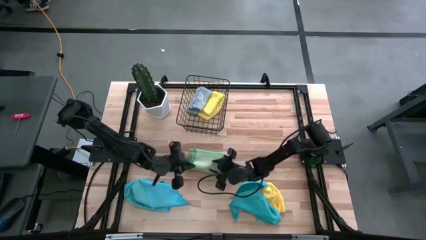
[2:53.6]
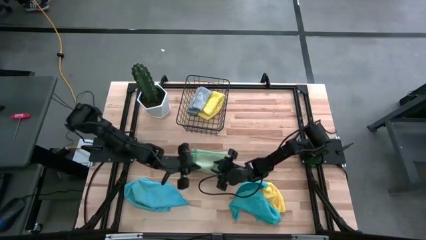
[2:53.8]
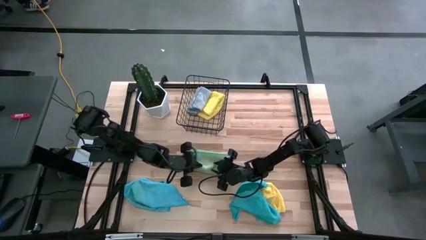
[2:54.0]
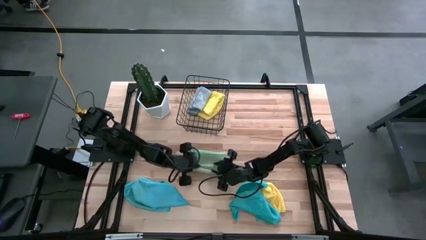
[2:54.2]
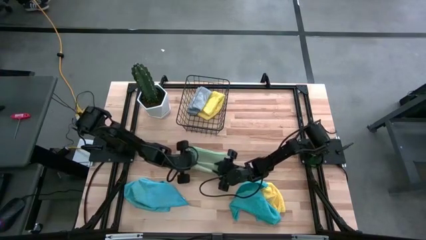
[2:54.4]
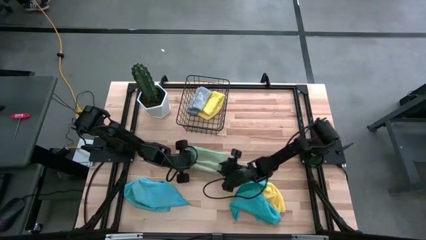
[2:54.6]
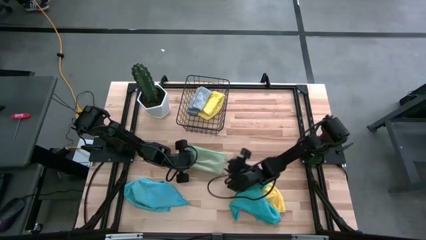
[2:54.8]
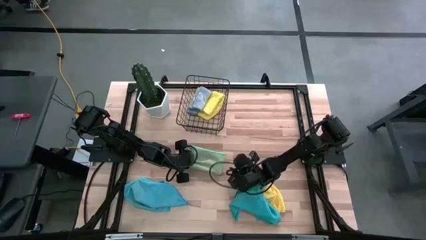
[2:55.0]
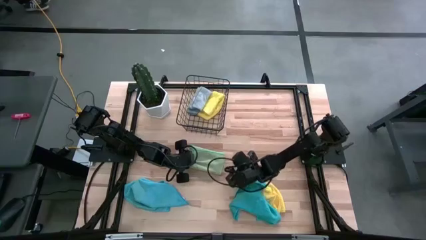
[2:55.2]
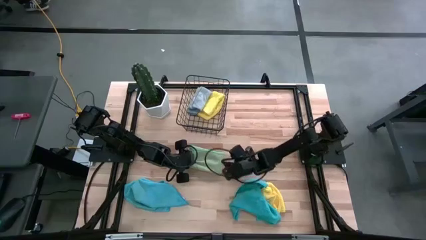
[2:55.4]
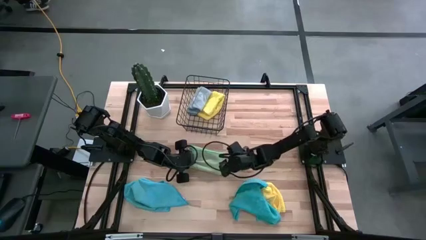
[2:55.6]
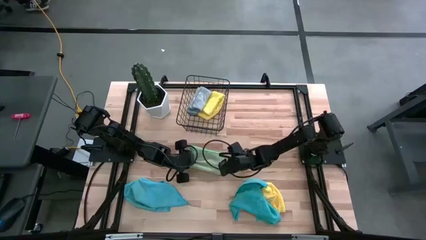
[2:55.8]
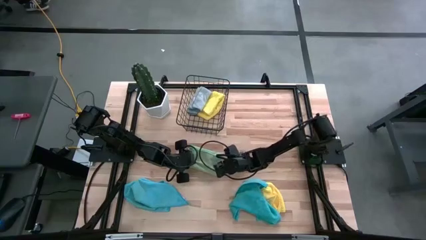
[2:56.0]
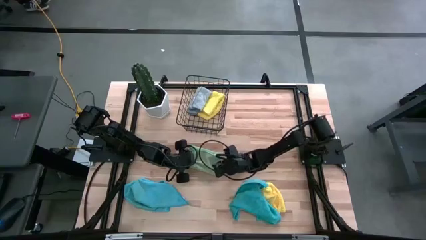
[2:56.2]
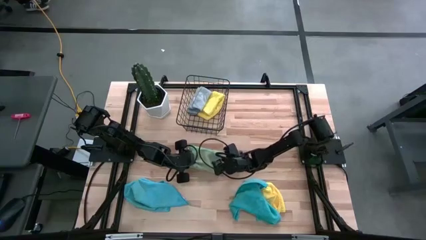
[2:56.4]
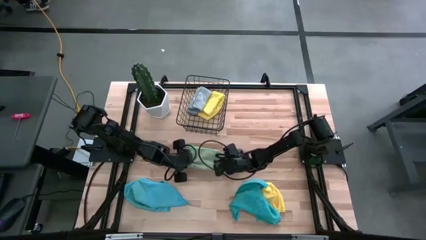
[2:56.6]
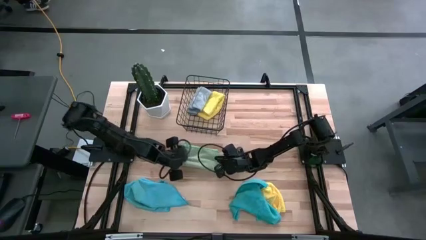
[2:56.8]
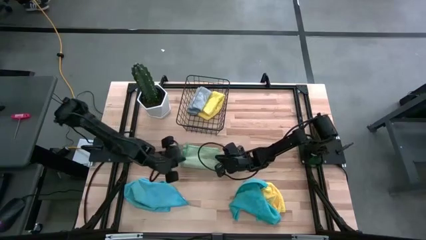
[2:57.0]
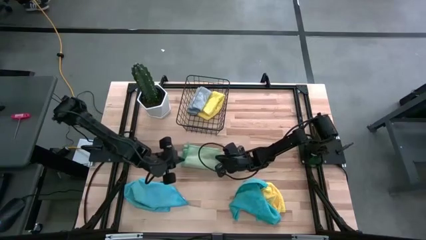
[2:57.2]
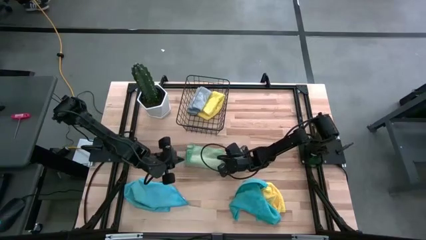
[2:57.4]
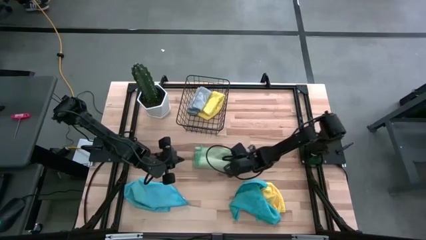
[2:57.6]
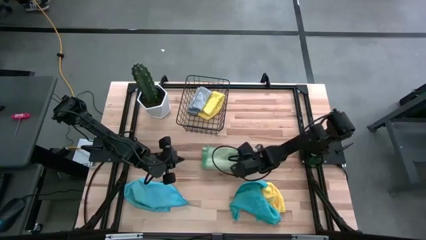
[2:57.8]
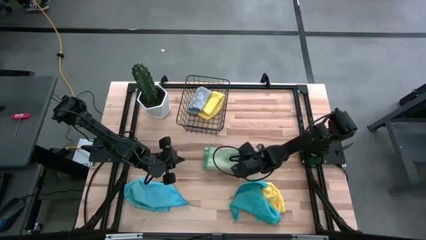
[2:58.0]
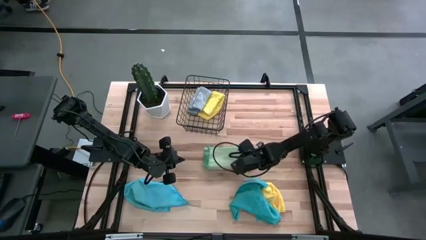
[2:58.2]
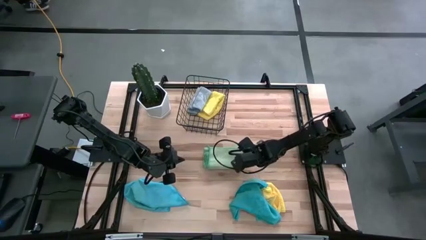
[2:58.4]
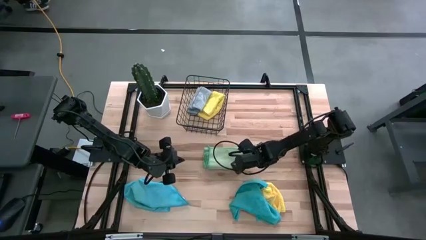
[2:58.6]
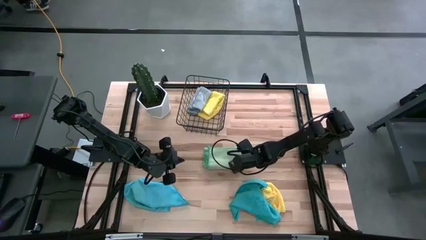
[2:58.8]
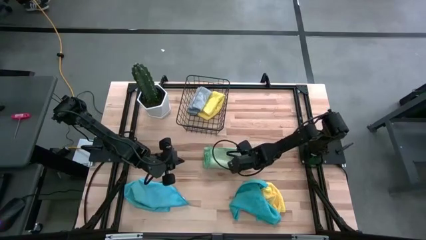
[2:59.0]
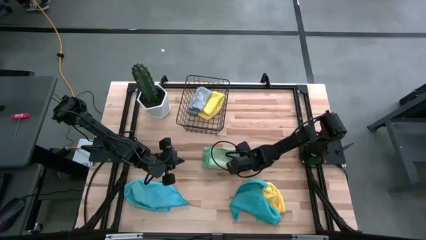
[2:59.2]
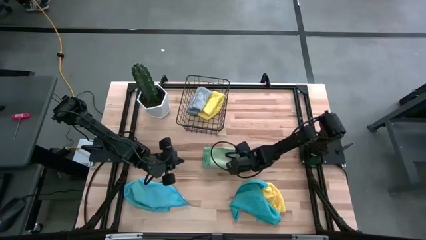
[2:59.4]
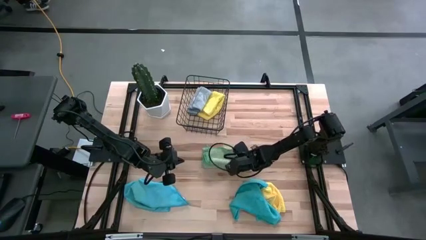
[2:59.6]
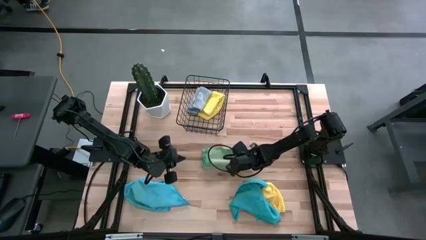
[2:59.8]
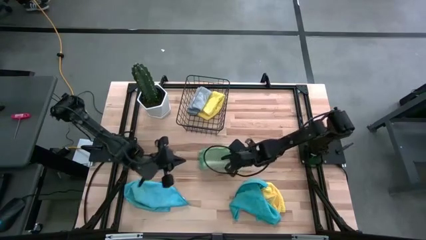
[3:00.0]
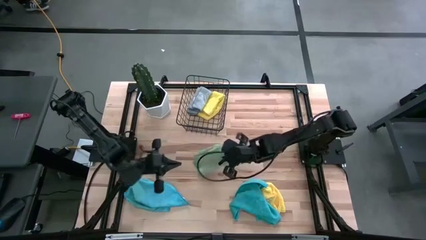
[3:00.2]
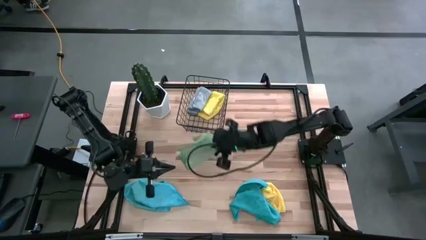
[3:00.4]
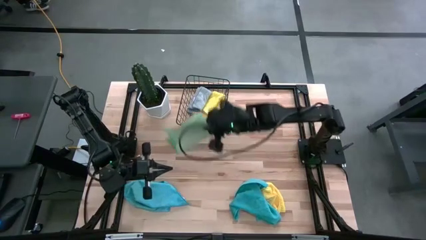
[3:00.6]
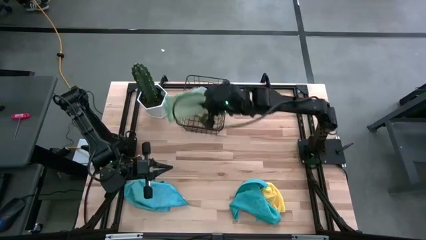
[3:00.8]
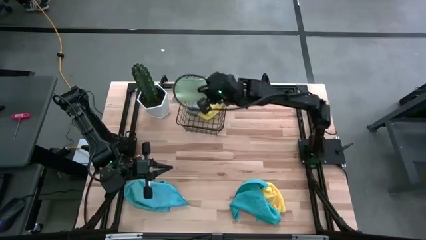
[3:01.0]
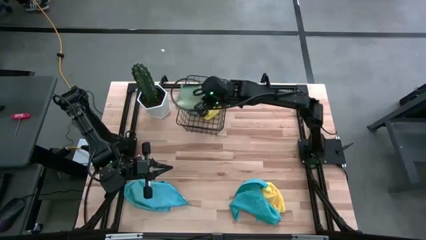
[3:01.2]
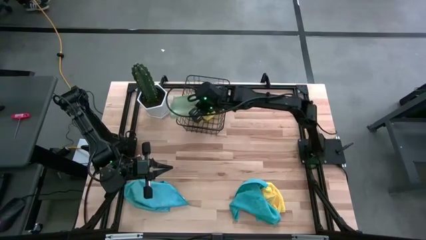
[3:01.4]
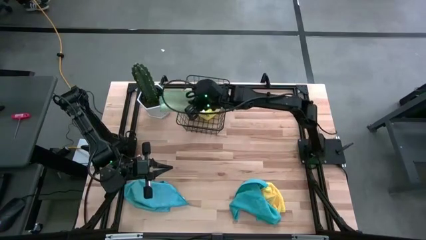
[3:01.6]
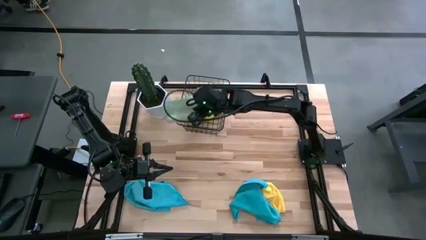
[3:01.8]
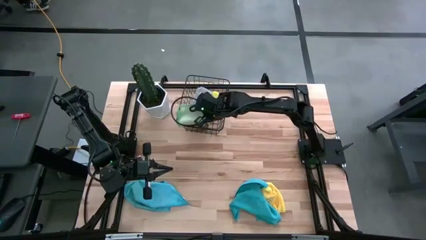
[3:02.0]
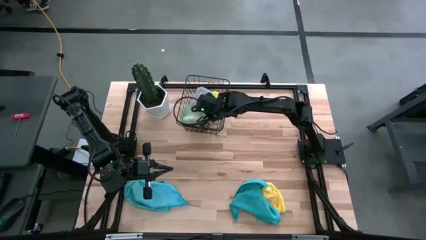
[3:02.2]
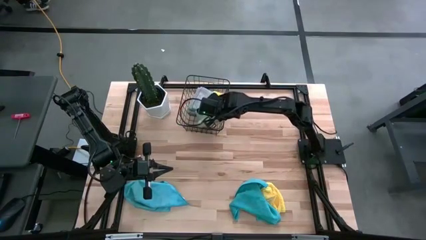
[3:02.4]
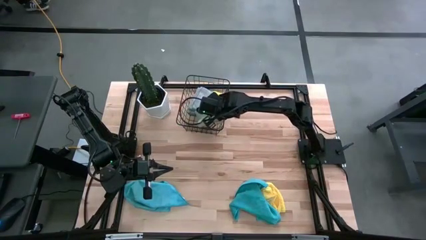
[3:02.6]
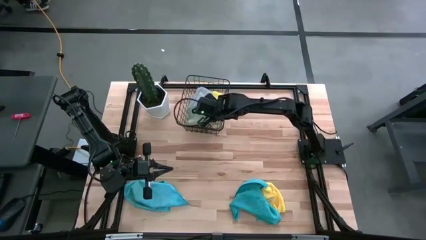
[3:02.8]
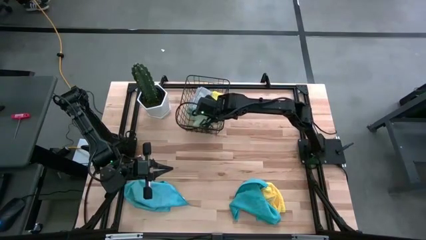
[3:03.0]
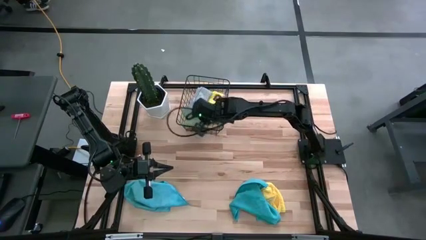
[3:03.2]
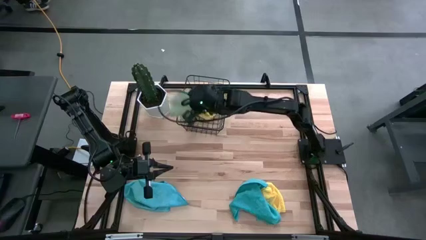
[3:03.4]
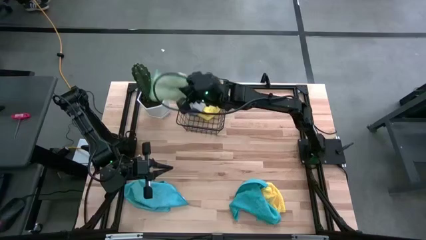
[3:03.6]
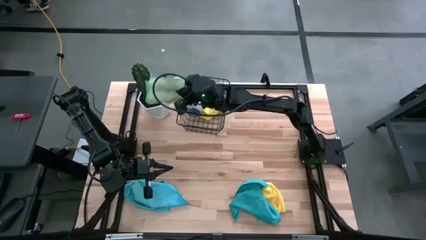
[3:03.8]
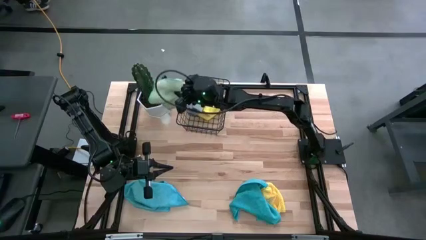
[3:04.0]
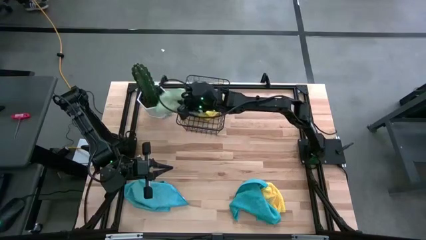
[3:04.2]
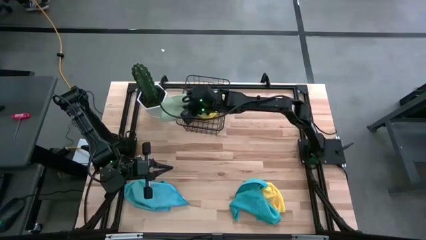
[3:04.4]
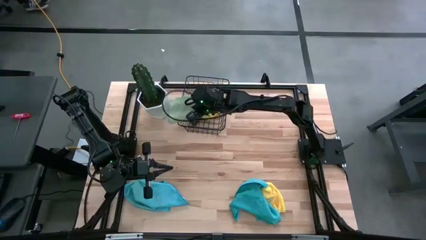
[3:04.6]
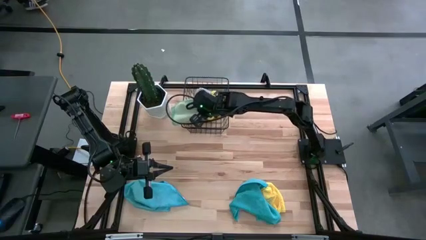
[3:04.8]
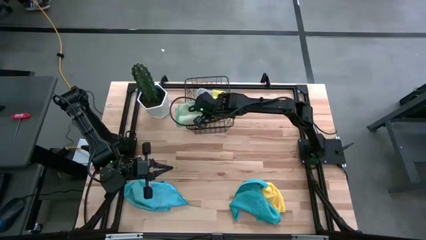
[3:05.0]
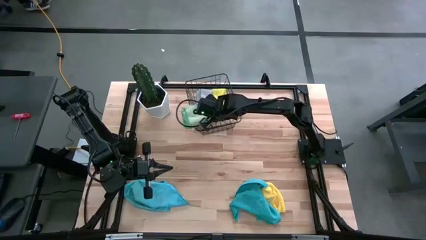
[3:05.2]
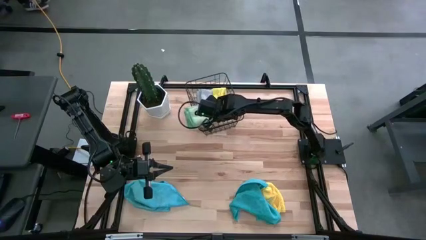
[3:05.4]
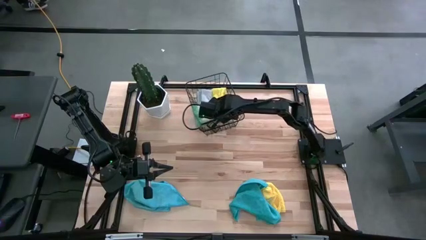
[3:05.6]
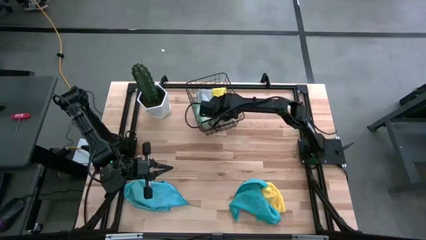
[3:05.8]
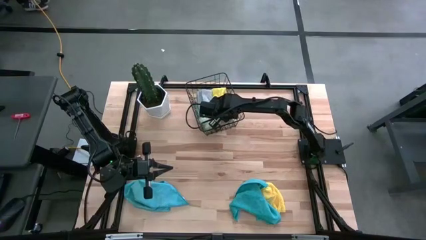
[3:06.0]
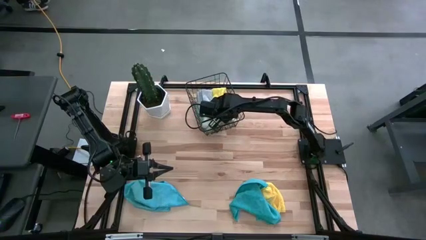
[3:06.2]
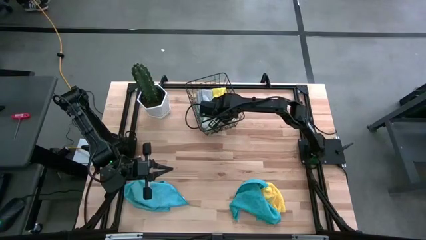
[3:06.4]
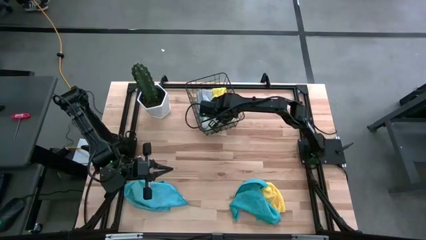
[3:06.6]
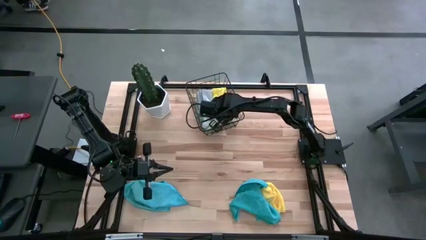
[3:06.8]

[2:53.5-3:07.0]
Task: Fold microfiber towels
Put the green microfiber cloth into the black wire basket

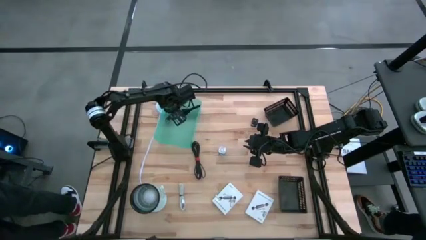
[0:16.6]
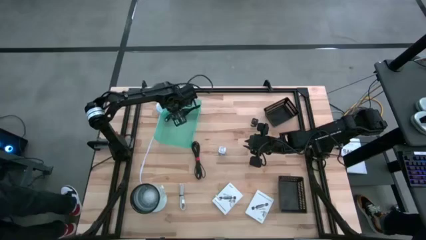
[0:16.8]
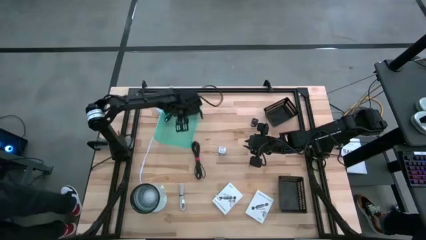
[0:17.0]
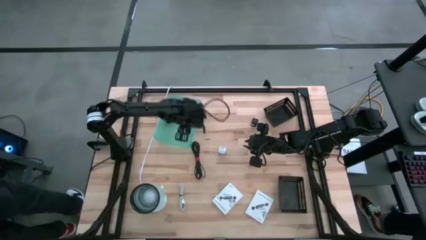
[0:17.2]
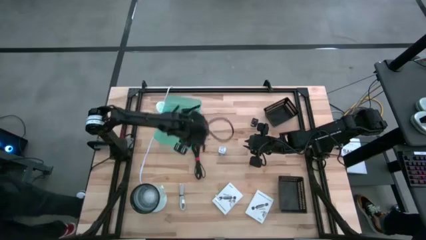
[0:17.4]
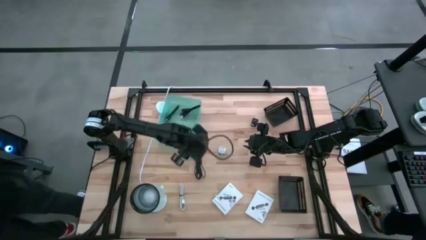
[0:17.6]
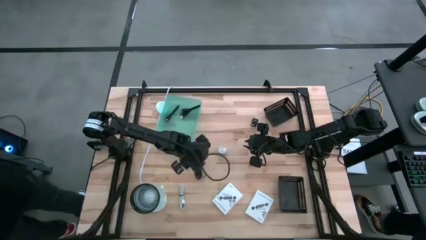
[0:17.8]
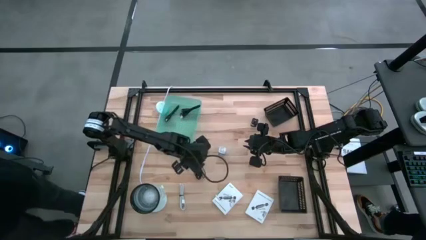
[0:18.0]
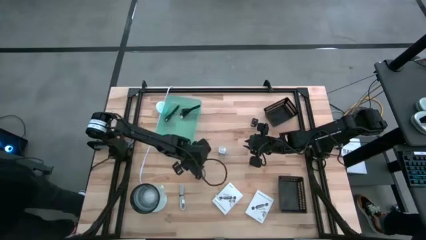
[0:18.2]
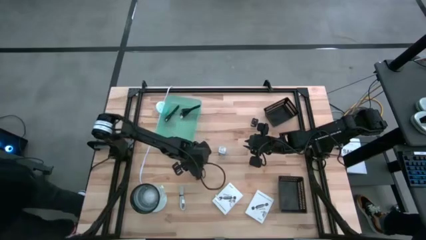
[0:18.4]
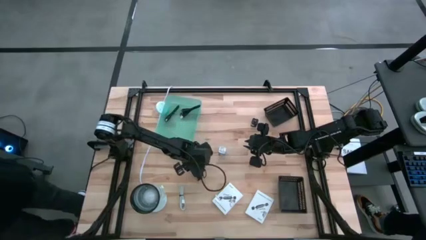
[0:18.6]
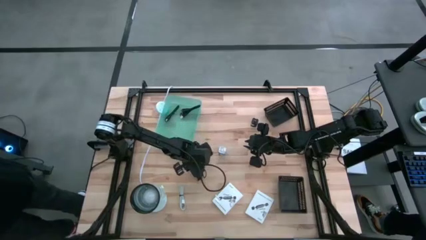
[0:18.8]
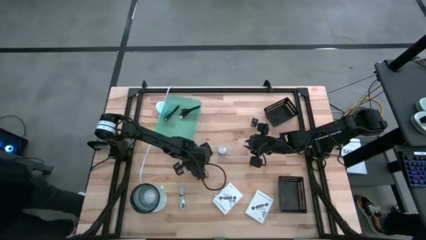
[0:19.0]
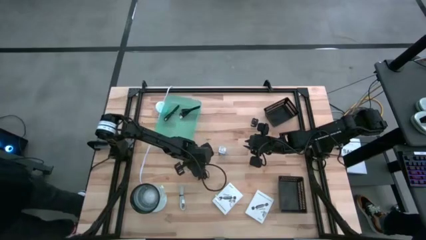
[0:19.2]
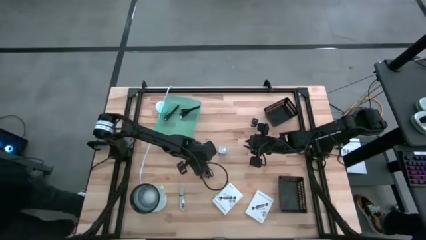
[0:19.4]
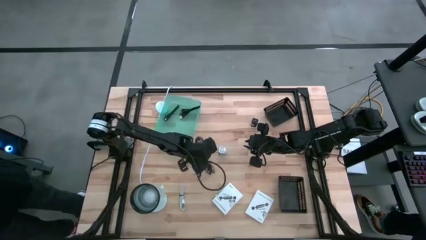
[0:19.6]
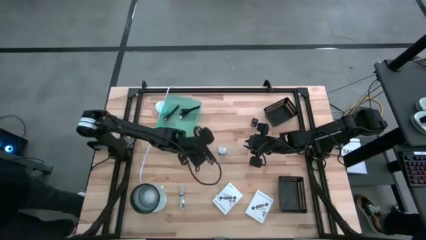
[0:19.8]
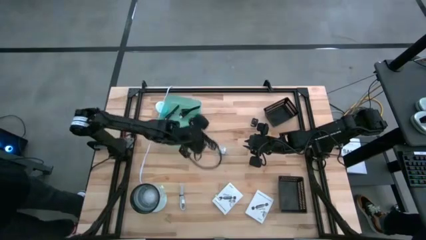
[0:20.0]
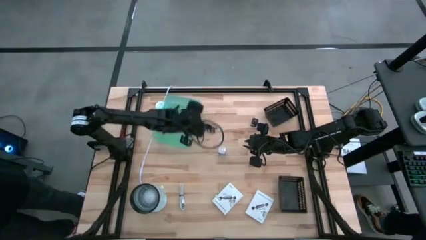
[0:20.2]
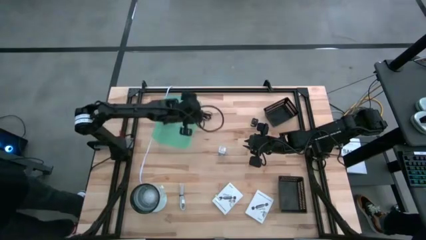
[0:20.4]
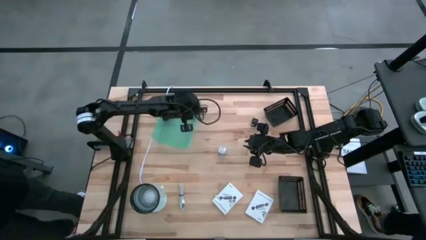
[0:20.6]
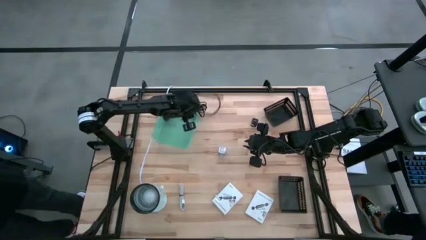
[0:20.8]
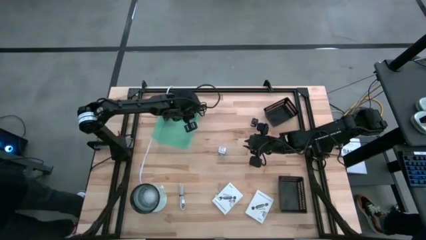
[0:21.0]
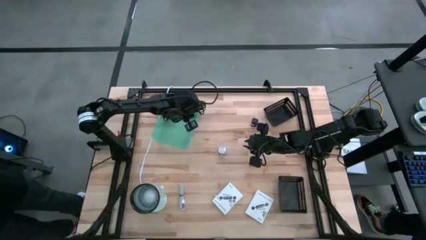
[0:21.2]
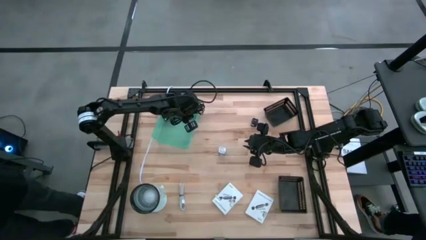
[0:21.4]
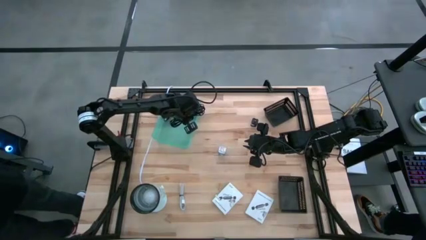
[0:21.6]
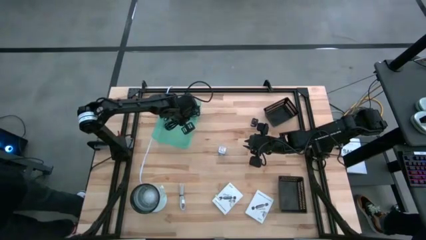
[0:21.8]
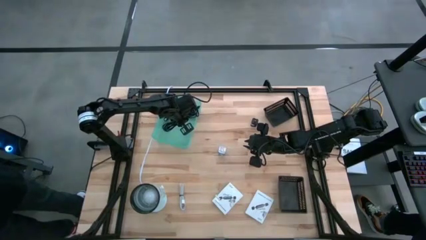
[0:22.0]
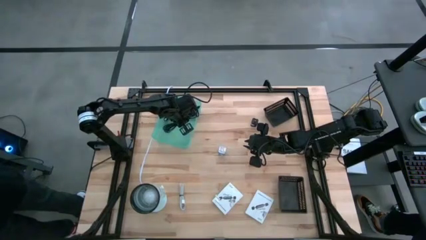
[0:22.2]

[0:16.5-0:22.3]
Task: Pick and place items into bin
Put the large black charger cable into the green bin
